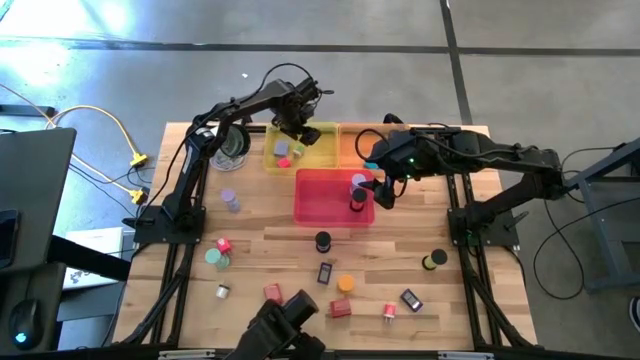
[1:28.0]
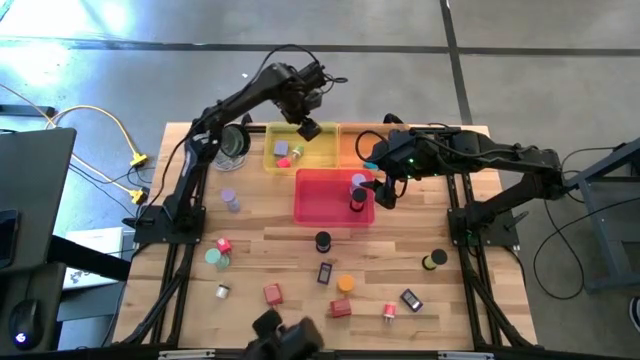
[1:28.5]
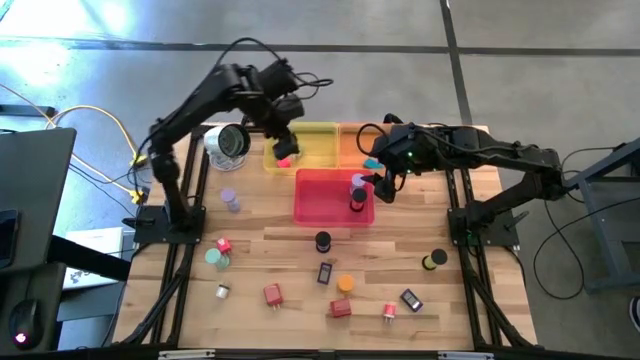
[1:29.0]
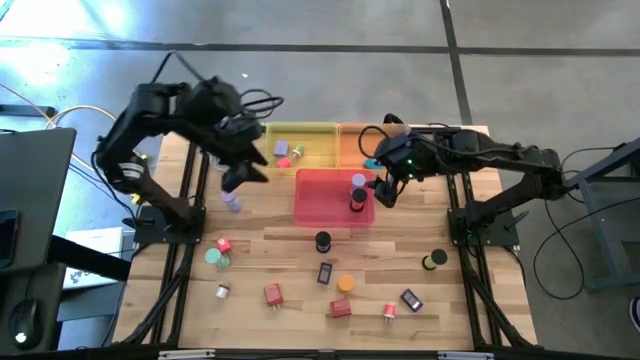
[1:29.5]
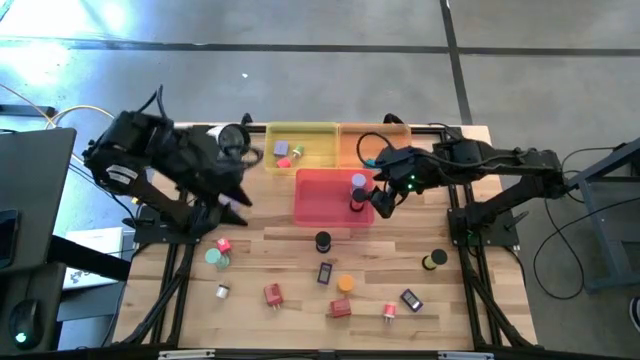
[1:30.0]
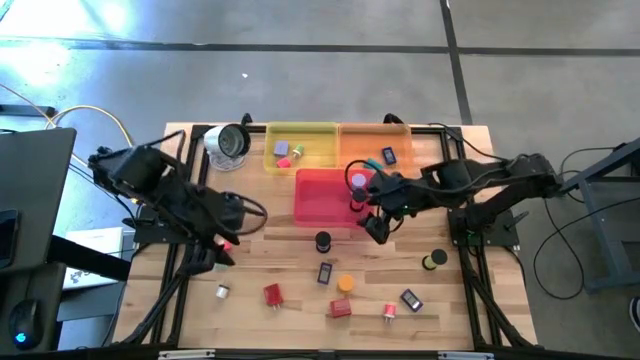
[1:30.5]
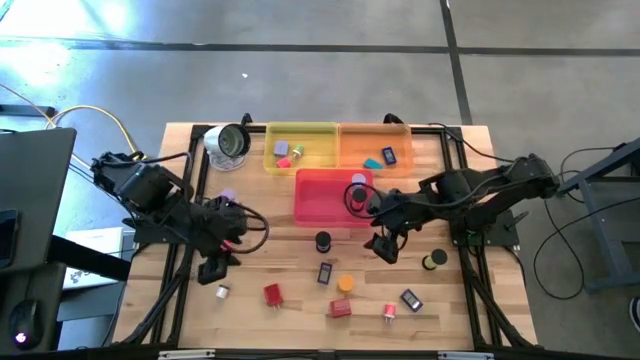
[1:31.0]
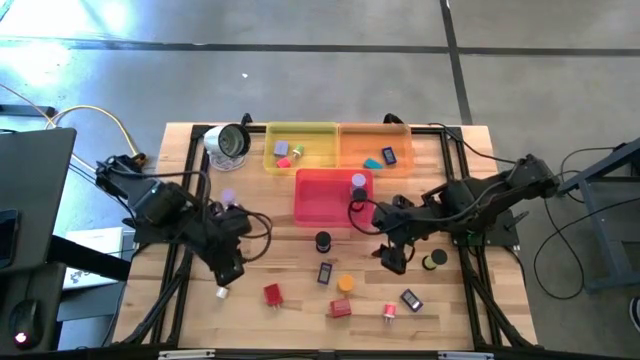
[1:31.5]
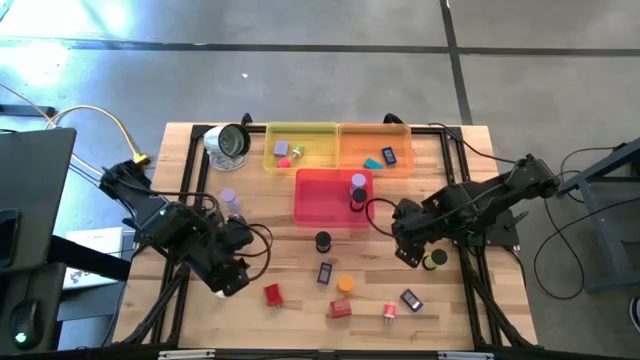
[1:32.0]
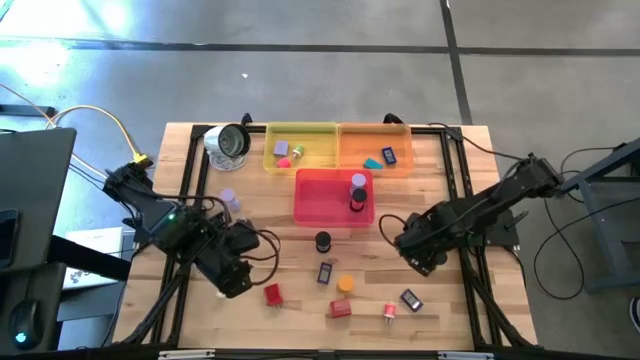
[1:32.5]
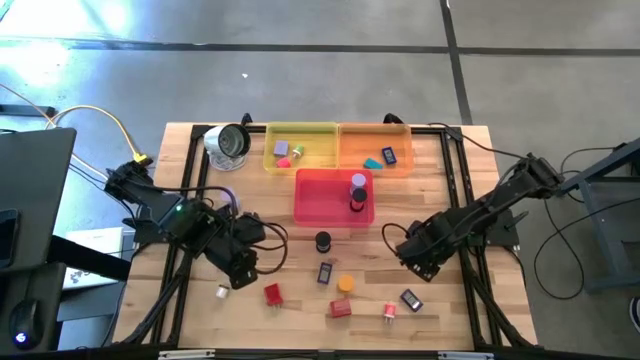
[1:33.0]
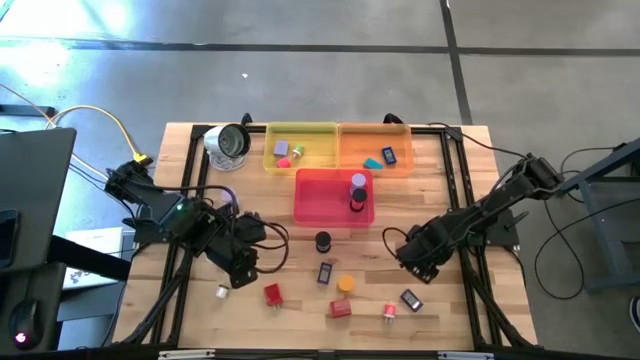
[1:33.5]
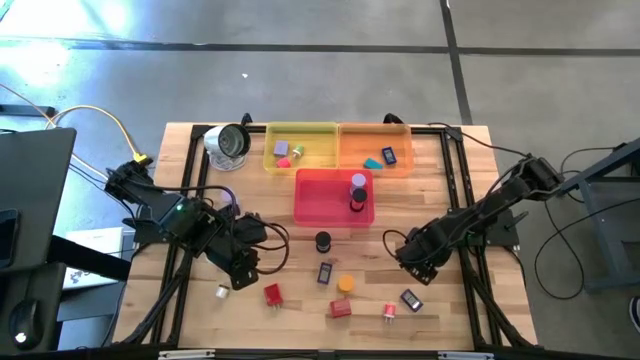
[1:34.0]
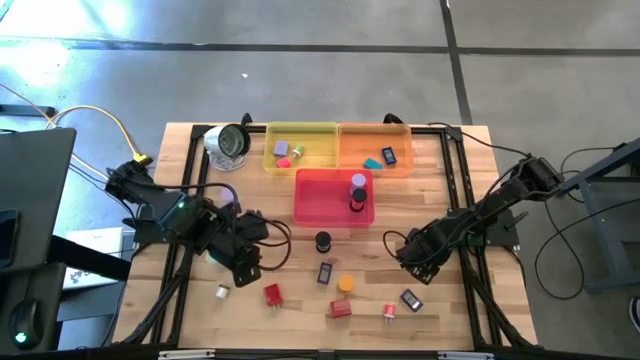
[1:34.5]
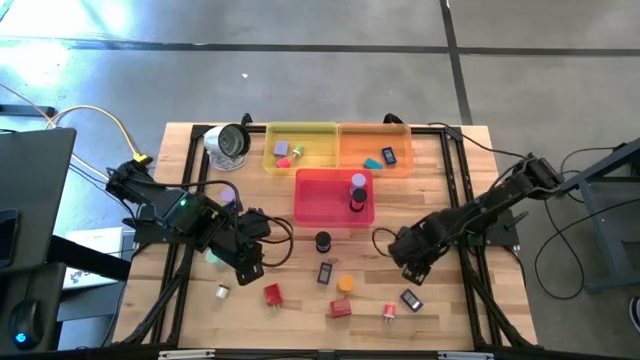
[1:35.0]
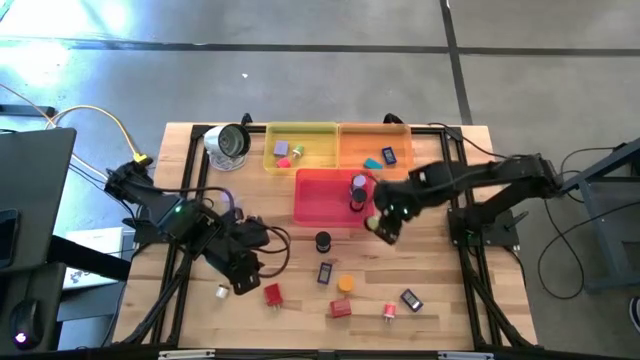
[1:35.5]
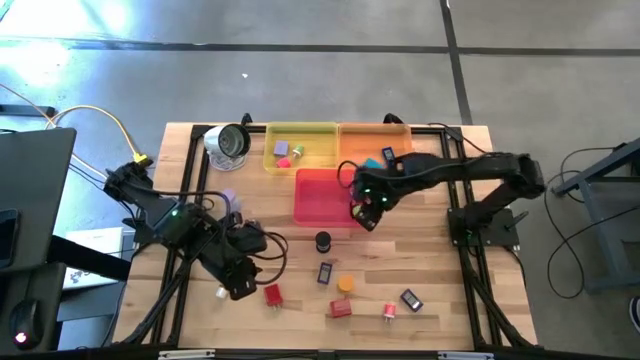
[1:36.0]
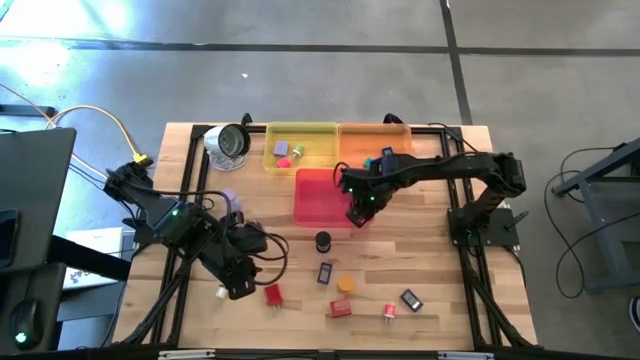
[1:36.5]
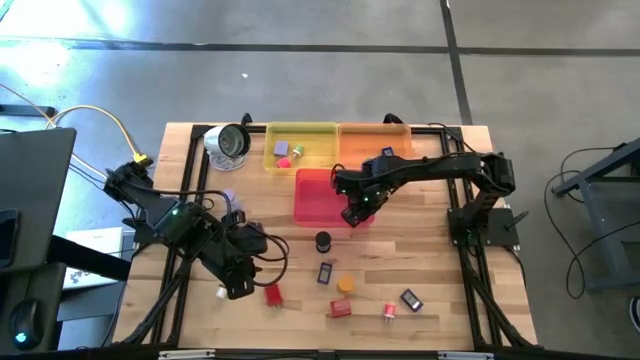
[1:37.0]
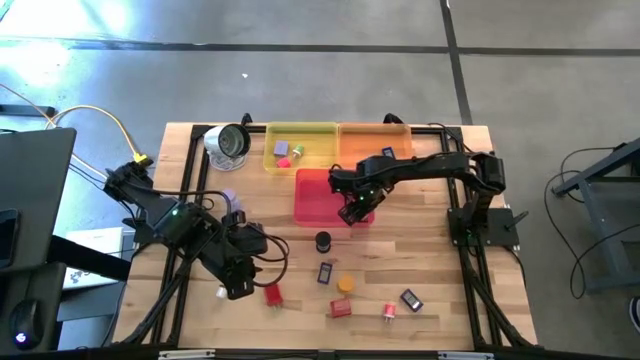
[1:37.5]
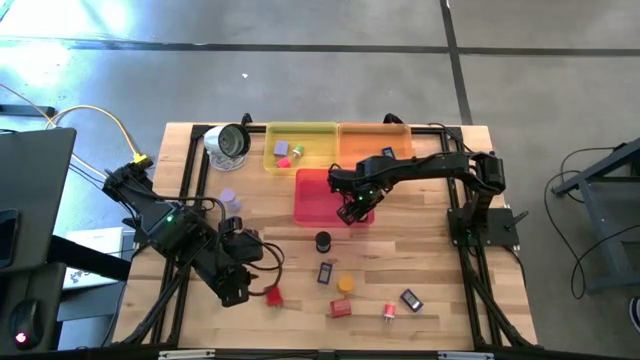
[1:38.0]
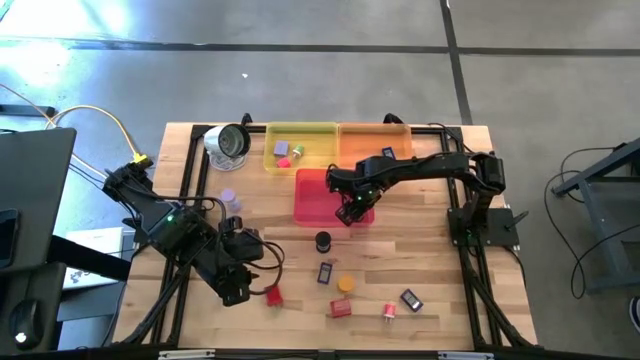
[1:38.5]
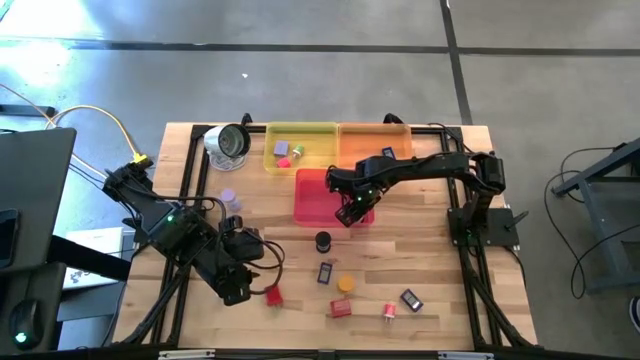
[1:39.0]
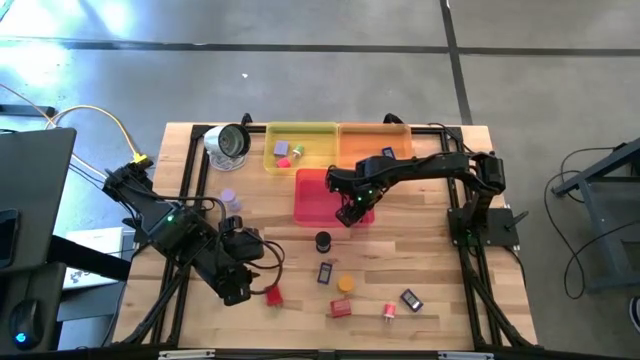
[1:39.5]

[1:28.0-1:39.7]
Task: Pick & Place Office items
Put the right black hourglass into the red bin

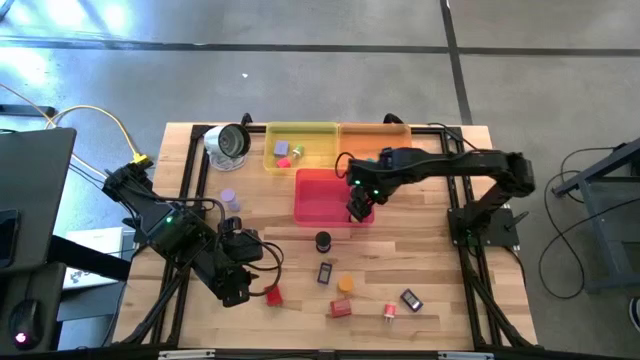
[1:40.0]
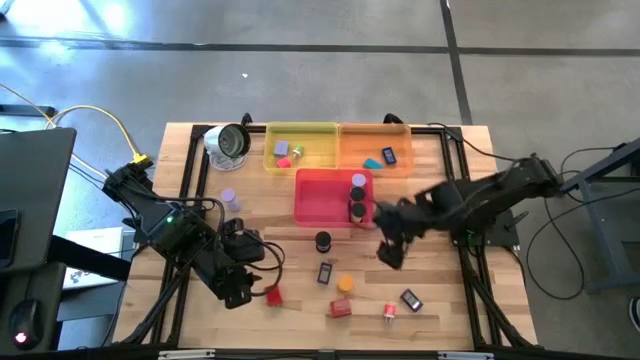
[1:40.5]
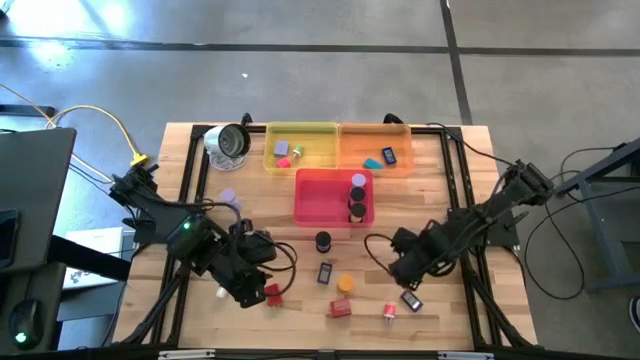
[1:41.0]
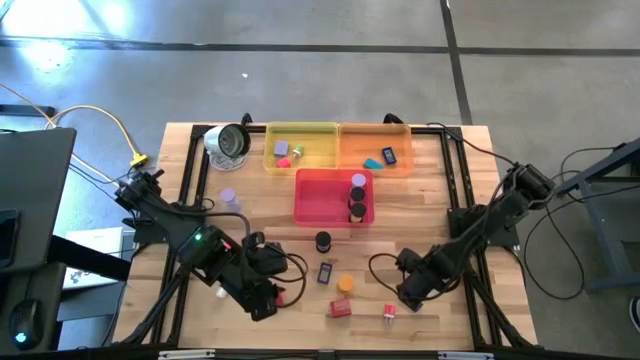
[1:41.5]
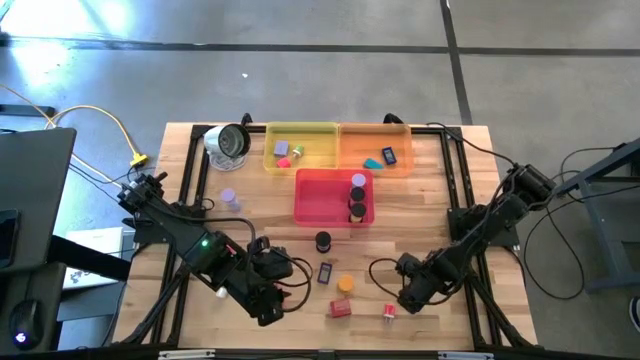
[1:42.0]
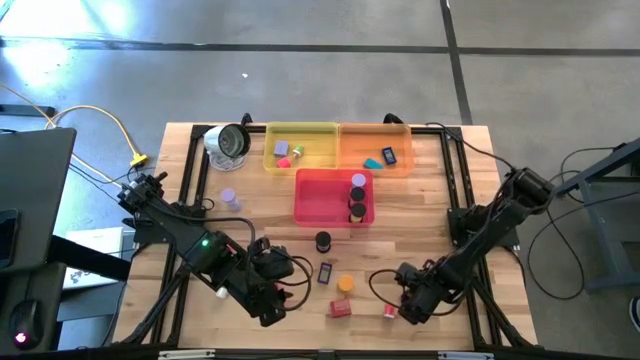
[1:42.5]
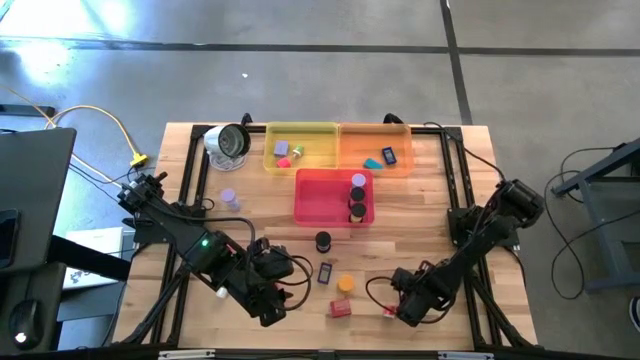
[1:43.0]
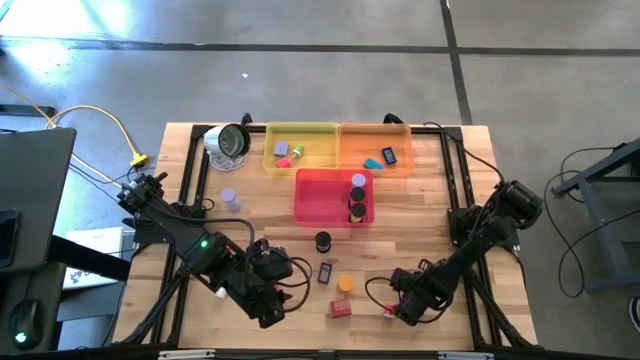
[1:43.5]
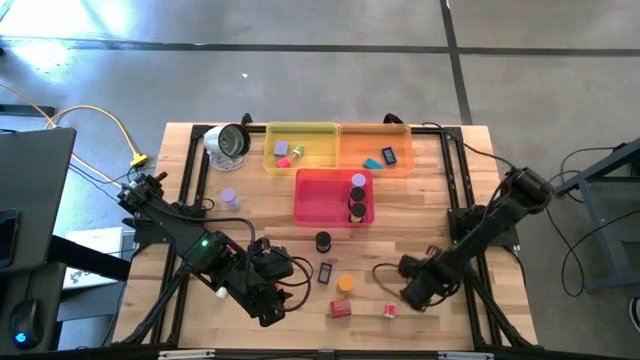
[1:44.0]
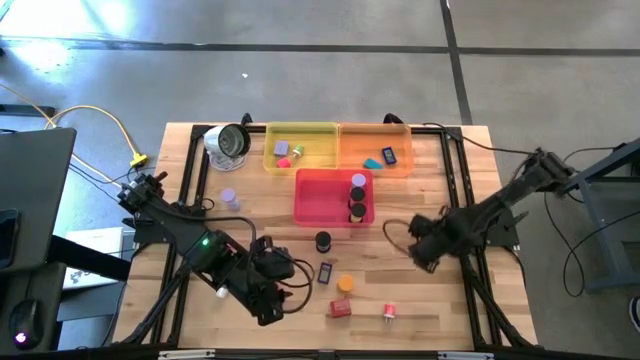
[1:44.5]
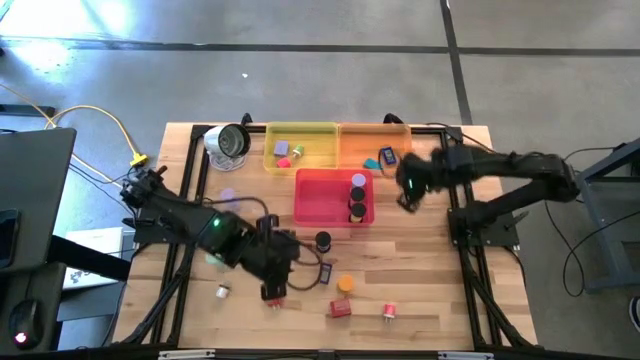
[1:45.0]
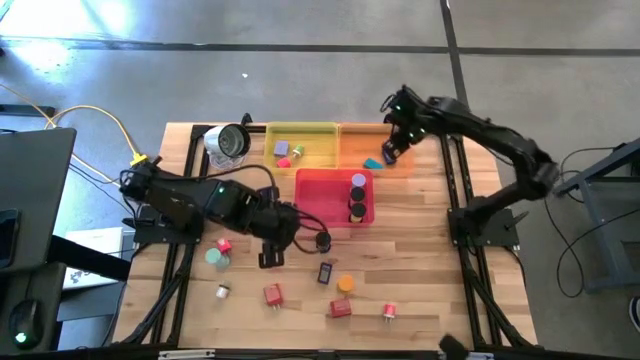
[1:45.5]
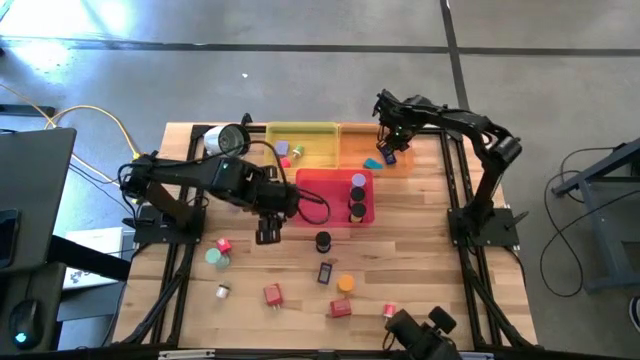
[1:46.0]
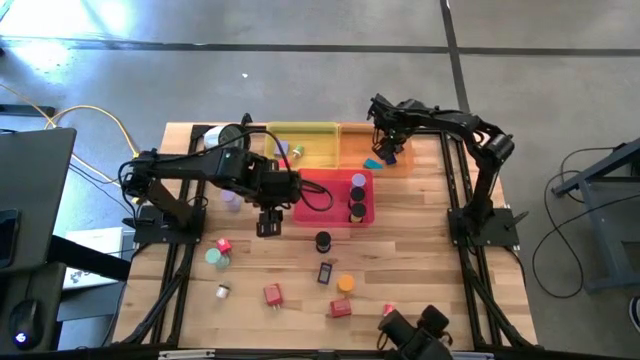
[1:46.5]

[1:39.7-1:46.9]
Put the violet digital clock into the orange bin

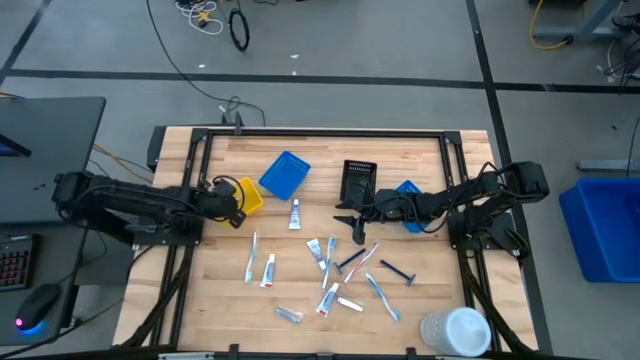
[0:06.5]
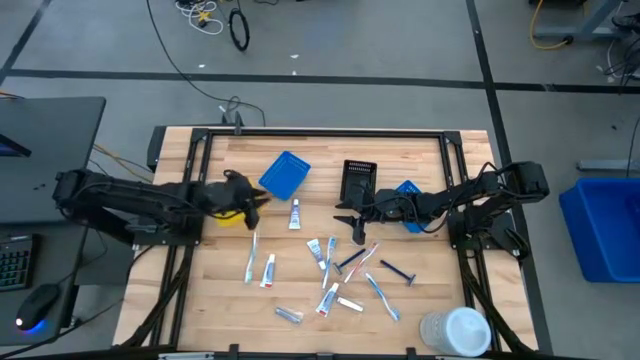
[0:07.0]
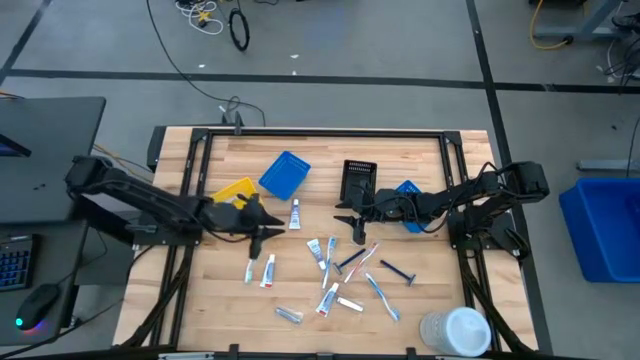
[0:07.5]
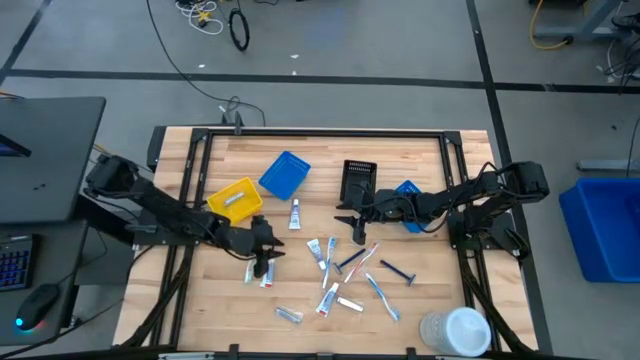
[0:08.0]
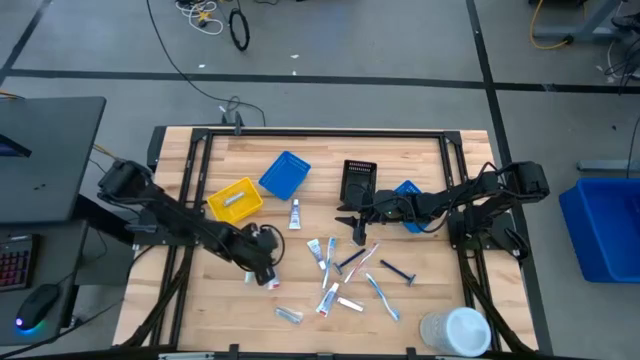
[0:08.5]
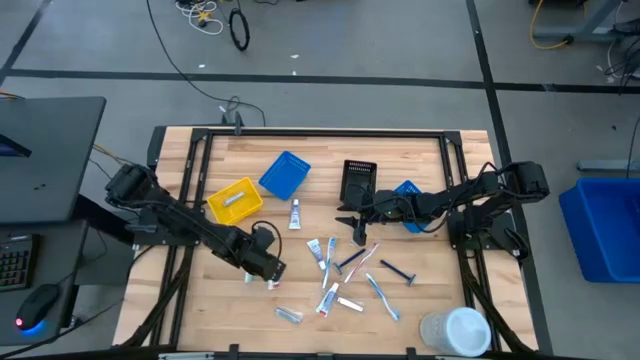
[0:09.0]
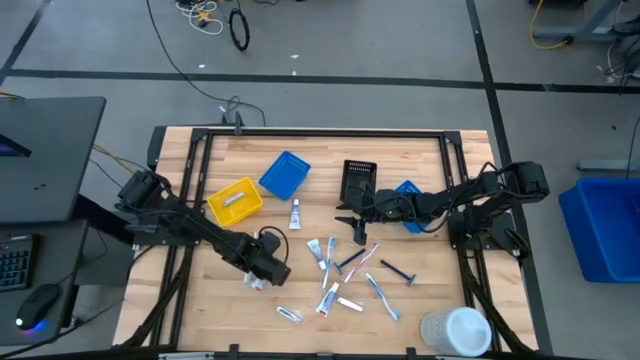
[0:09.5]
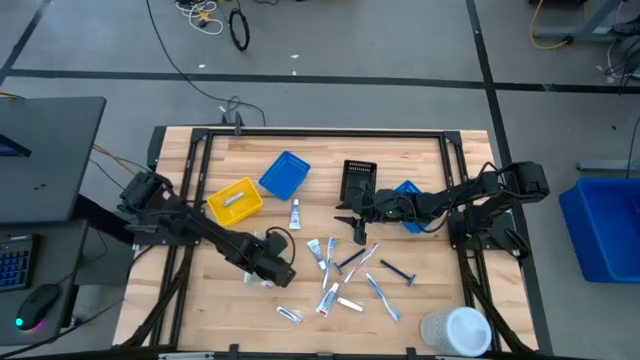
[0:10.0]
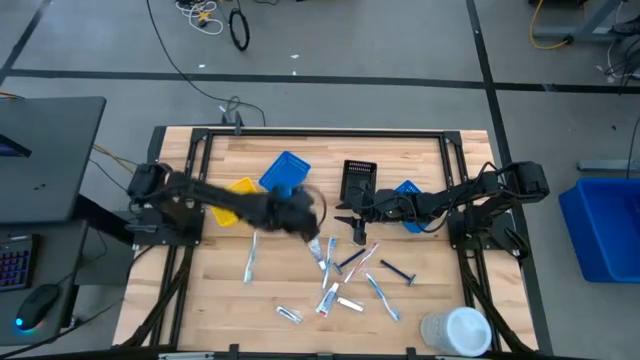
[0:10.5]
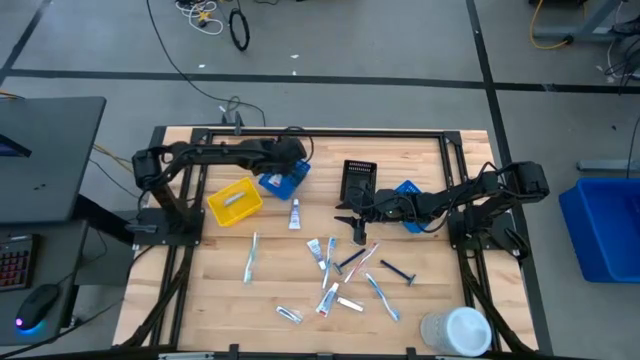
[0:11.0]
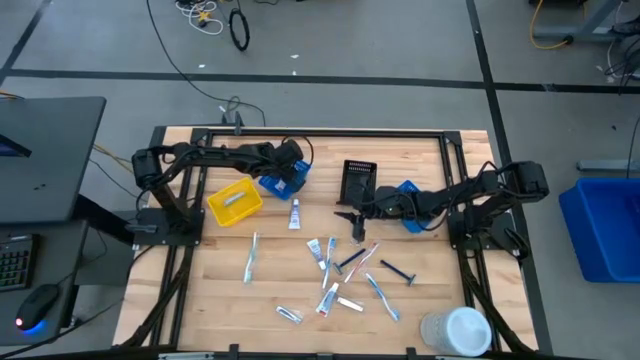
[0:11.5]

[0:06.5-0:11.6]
Task: Pick & Place Travel size toiletries
Put the violet toothpaste into the left blue bin
